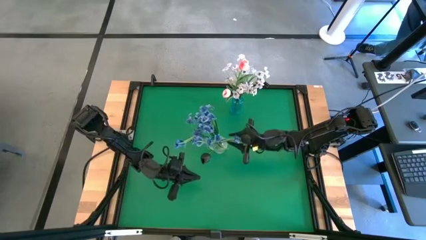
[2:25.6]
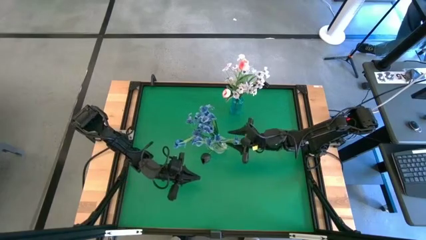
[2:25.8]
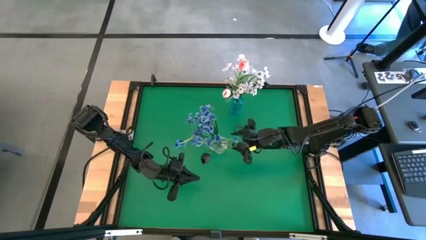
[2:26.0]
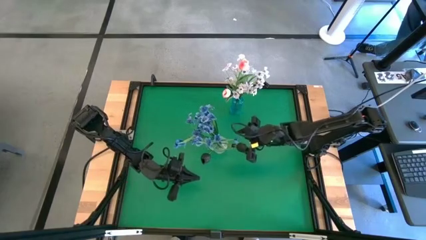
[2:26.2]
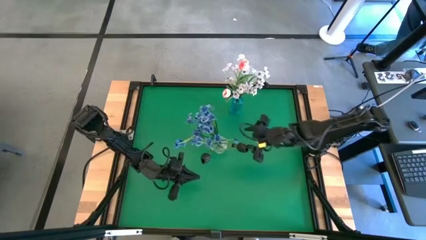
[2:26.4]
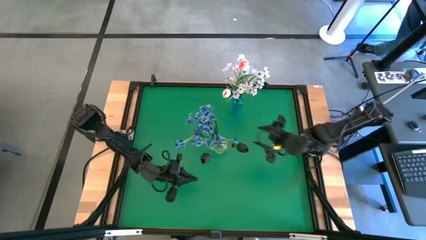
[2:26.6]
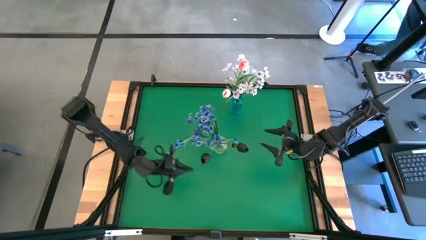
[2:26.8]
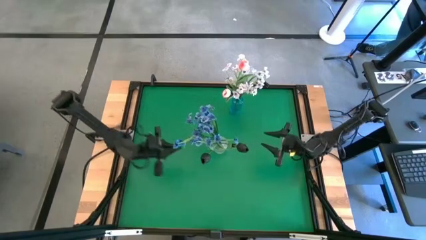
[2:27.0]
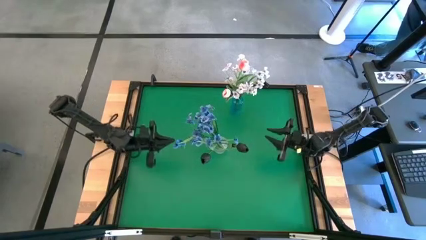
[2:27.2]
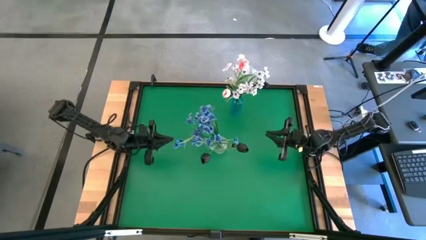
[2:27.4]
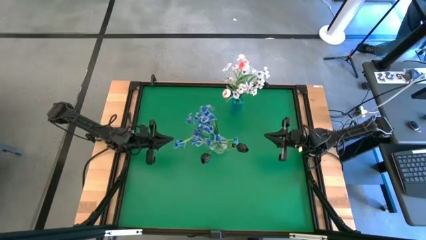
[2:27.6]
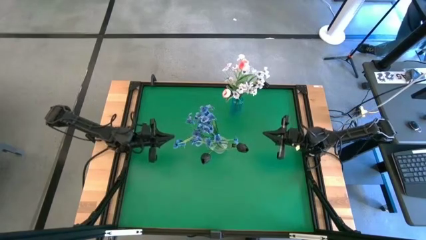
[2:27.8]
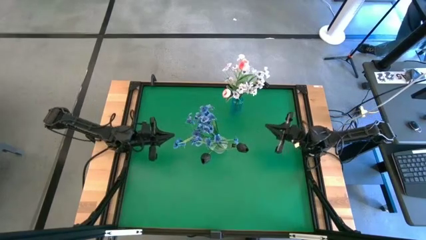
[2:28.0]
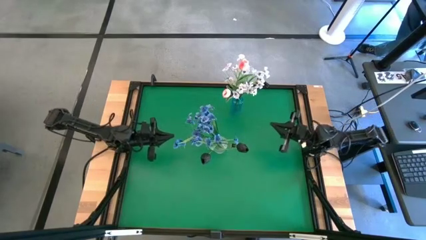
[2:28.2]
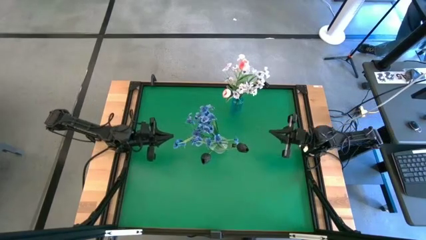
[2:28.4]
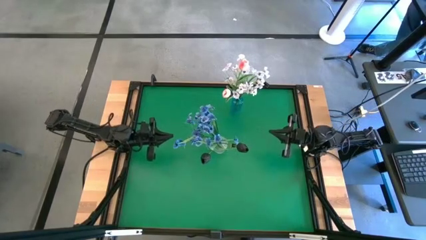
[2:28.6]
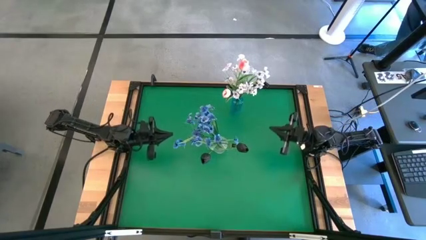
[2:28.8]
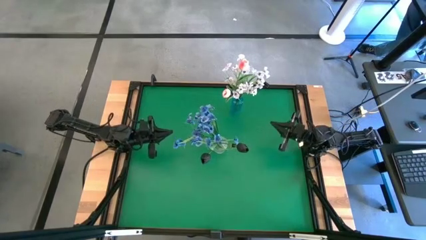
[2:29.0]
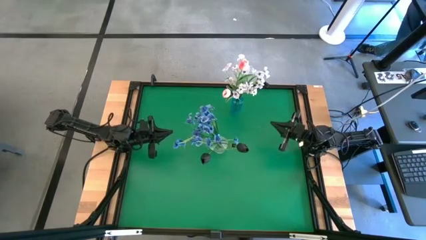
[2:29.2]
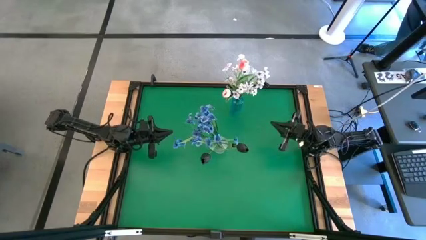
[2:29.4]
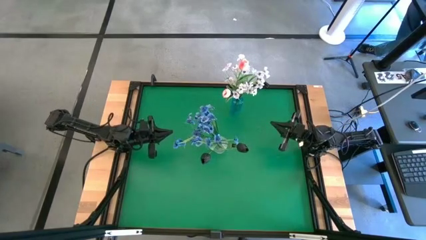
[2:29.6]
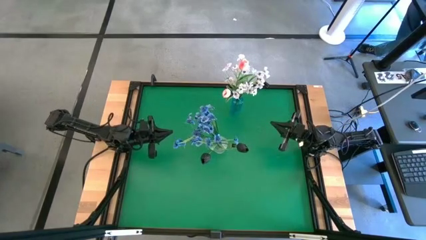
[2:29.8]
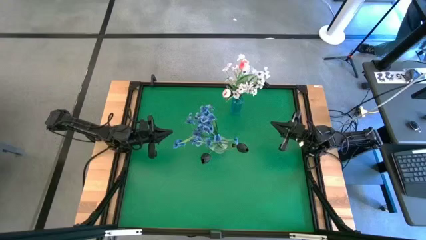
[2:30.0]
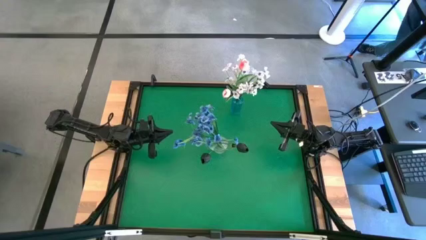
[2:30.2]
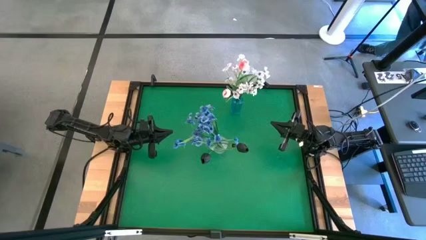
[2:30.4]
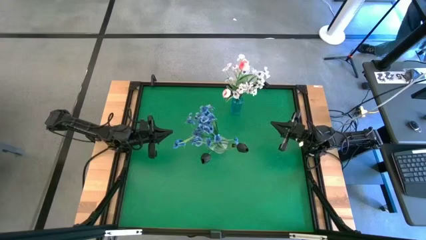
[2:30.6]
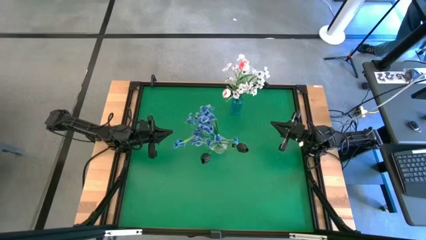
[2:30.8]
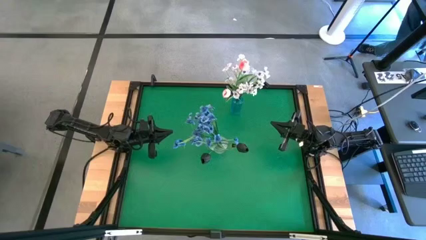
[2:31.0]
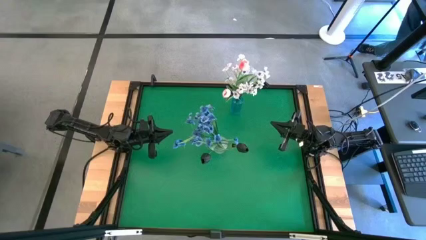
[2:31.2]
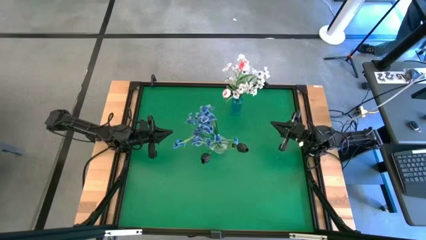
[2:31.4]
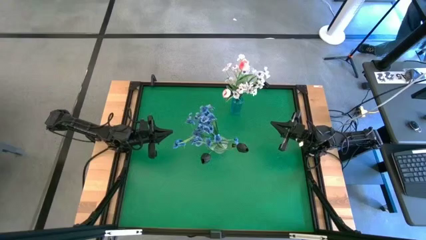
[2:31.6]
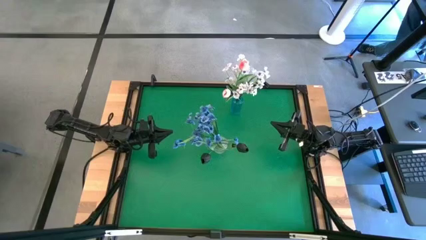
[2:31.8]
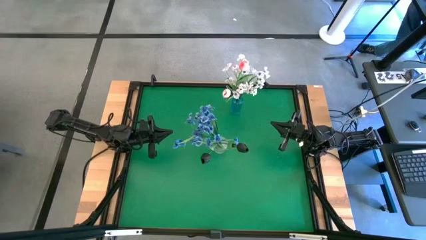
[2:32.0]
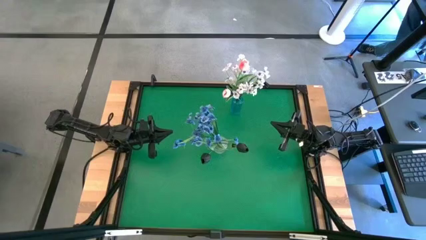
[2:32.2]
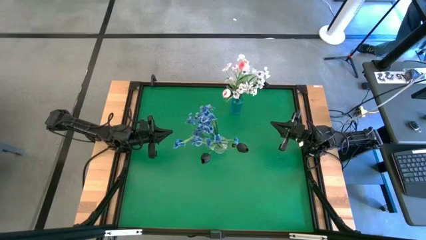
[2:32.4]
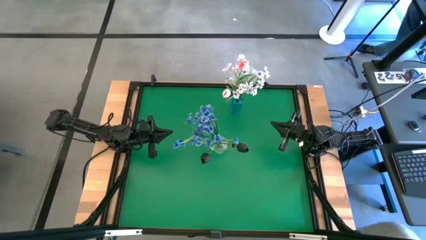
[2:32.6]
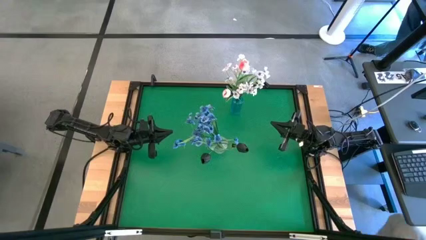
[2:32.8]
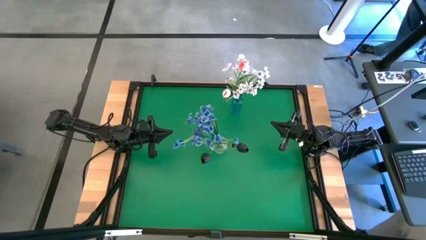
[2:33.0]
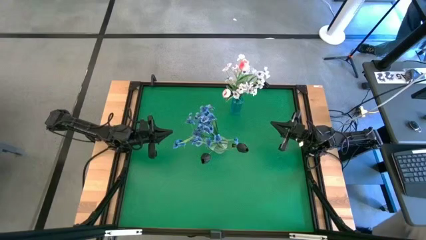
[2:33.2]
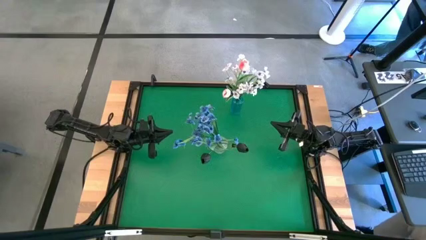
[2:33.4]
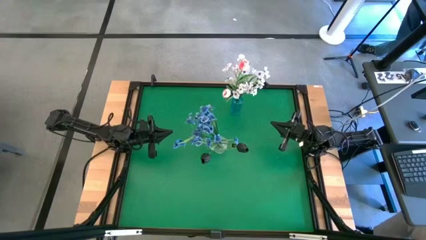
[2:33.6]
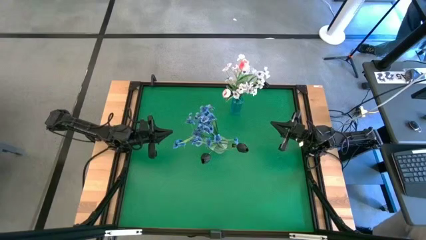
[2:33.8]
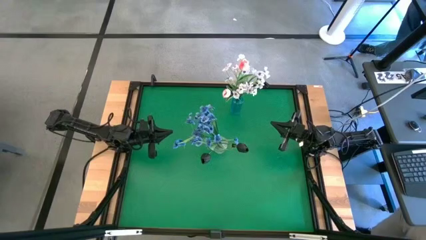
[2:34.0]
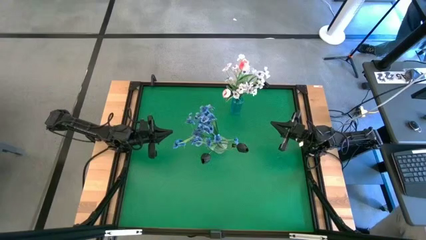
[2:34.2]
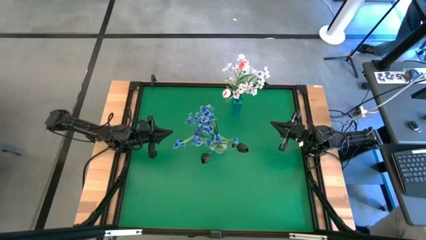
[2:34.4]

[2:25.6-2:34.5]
Task: Sort flowers into vase by color
Return to Home Position

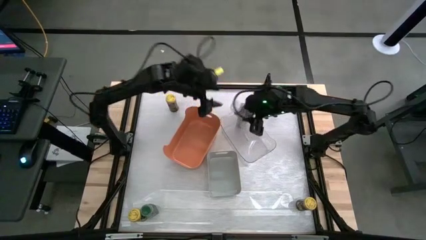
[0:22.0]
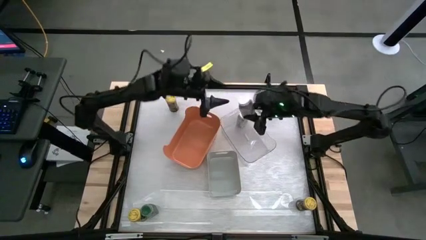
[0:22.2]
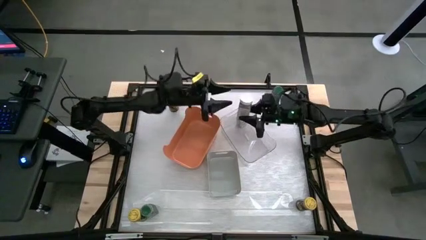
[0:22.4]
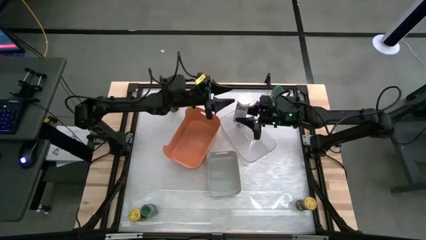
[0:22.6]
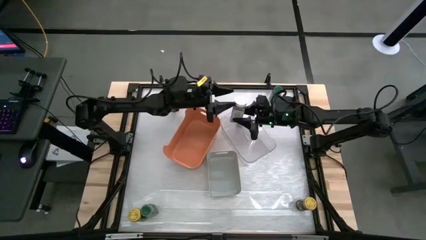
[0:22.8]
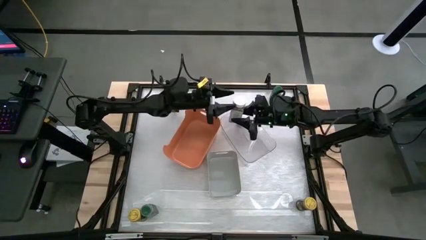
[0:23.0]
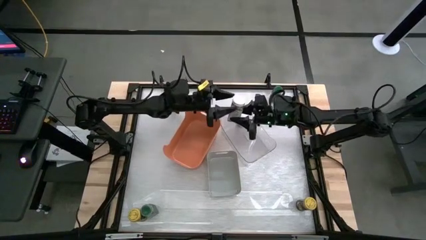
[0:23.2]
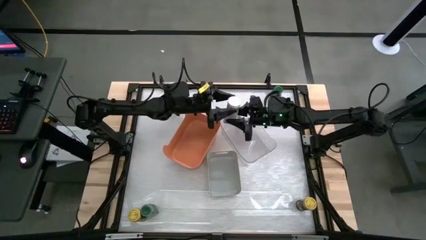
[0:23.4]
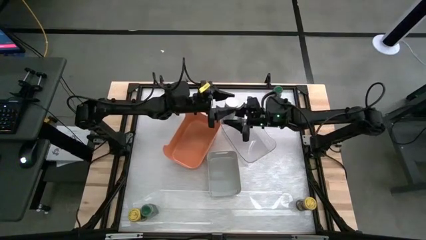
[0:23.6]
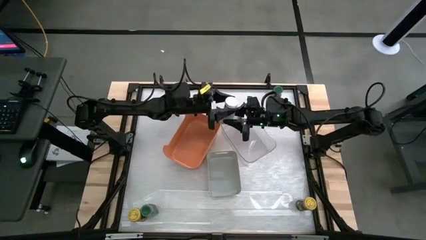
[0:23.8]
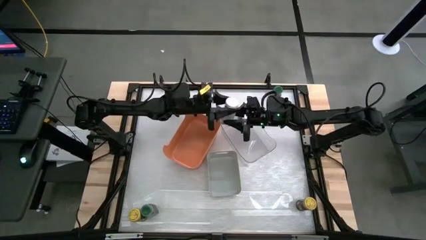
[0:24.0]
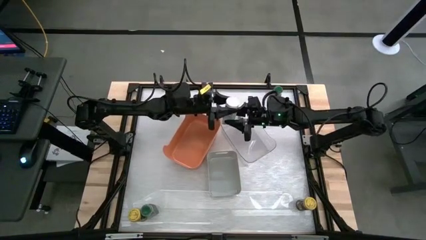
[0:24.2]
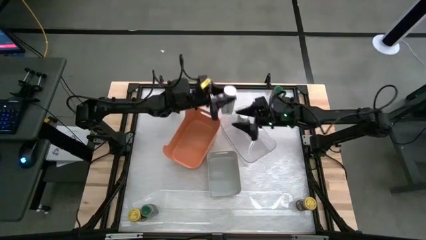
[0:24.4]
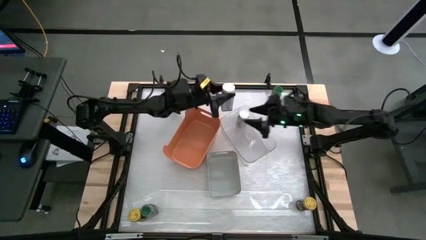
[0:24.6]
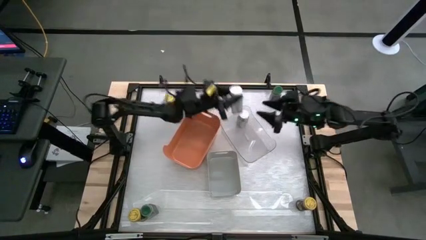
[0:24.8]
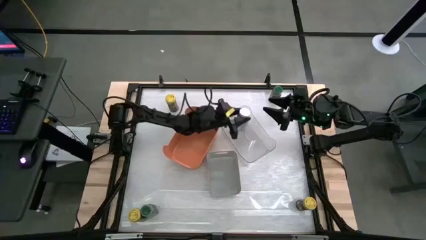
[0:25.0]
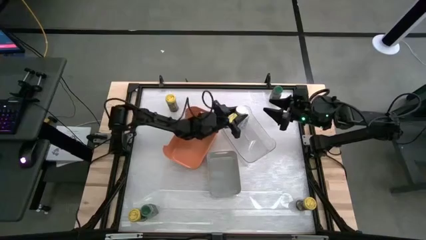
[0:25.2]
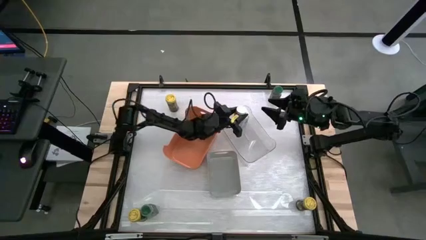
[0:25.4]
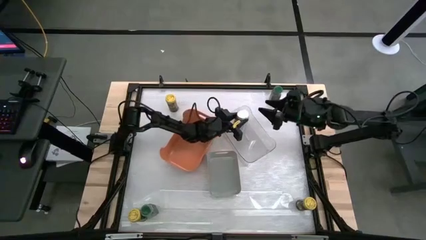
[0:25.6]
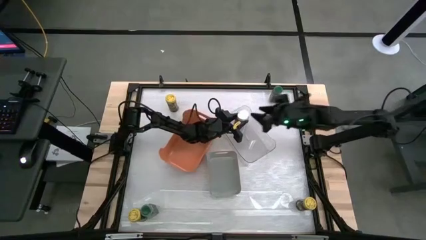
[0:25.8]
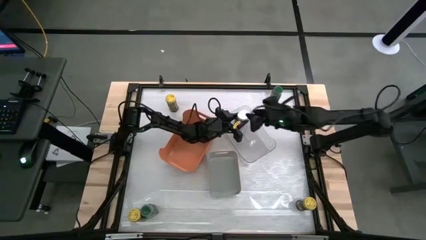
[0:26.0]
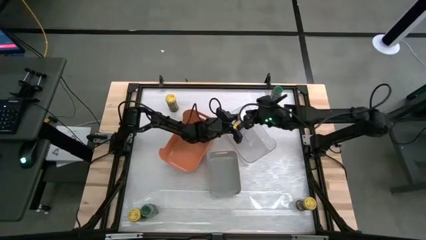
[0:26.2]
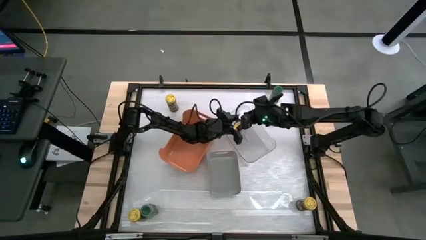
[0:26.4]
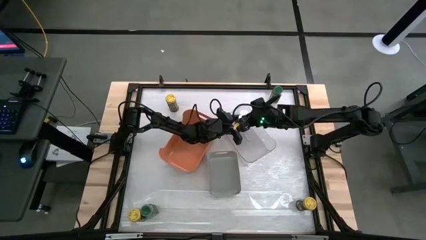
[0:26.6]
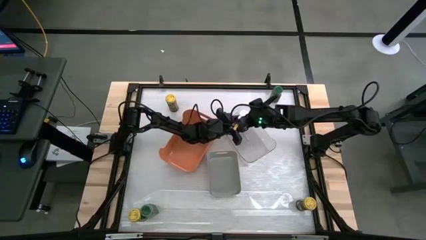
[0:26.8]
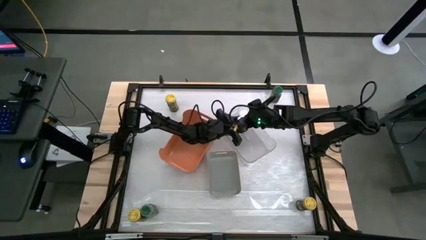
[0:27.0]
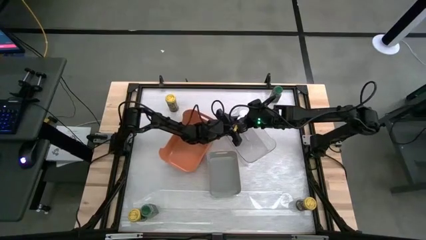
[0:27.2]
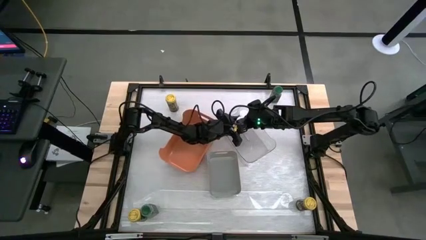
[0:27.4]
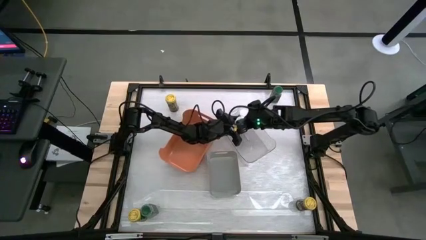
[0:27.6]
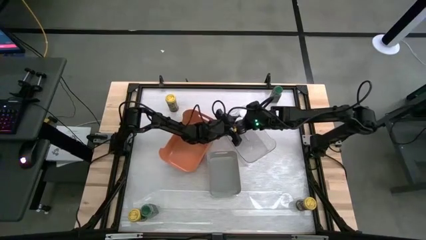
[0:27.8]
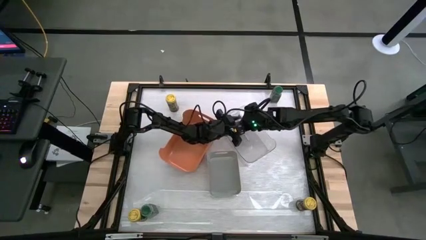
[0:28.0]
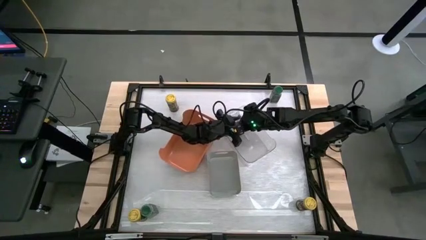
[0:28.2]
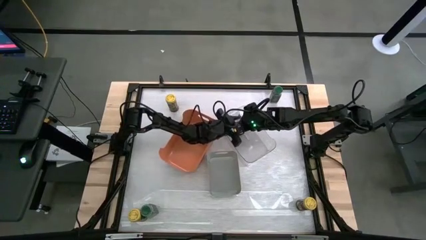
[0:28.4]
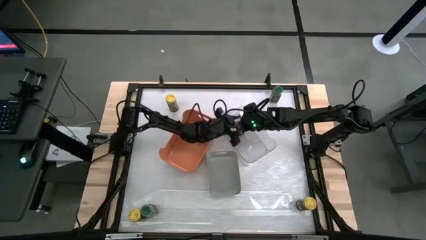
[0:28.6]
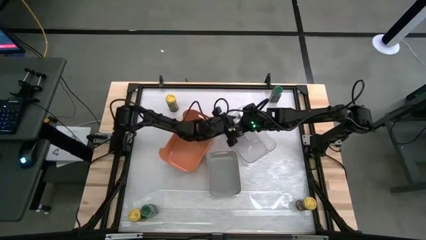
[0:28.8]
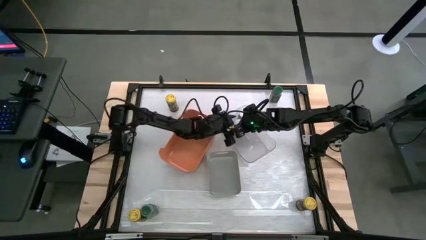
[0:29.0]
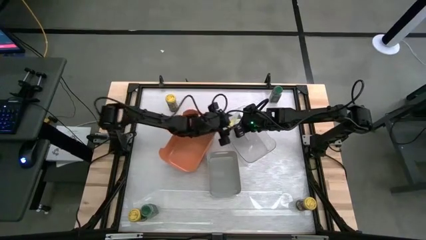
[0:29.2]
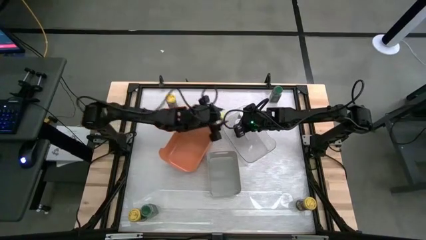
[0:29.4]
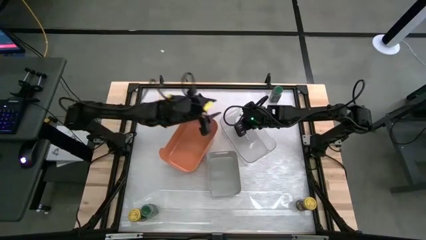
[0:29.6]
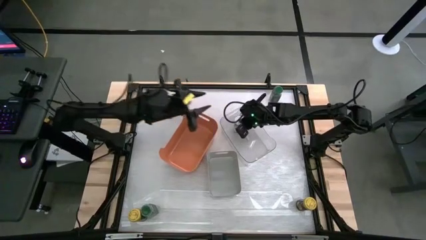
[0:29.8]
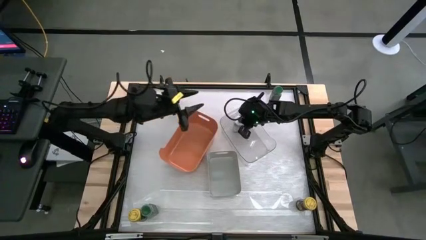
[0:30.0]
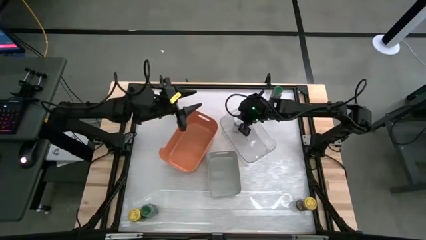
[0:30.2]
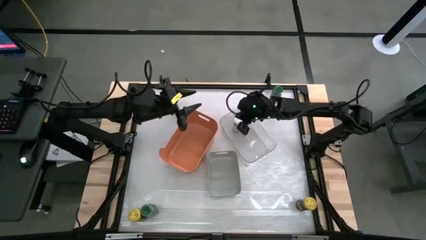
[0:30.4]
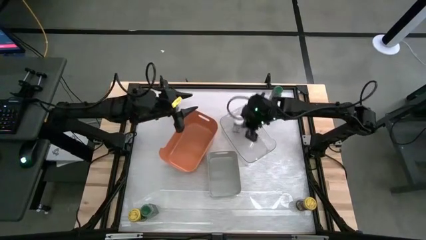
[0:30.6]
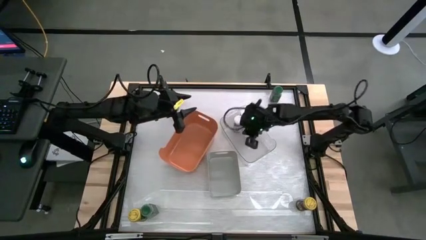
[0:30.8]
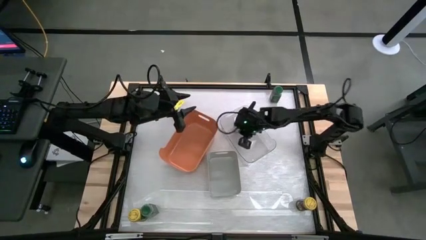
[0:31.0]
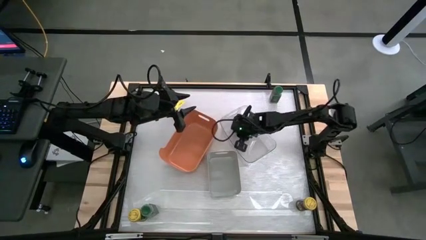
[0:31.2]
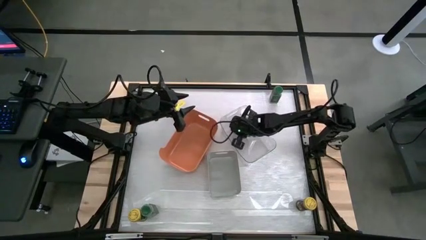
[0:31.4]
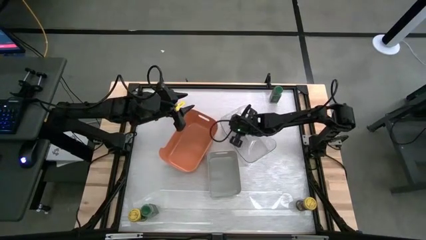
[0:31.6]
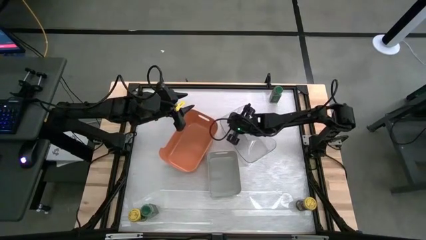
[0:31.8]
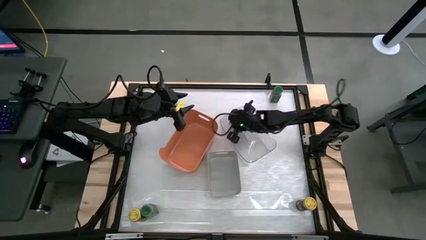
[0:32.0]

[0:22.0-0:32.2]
Task: Sort spices by type
Put the white seasoning bottle into the transparent bin
